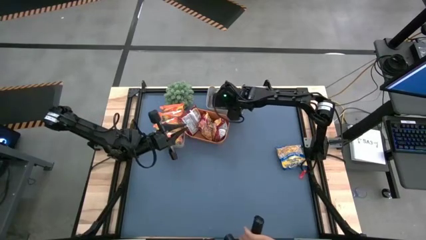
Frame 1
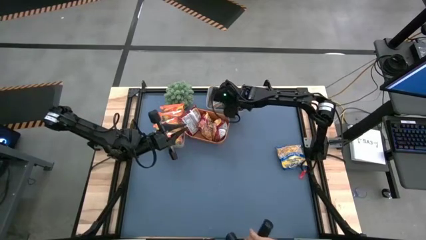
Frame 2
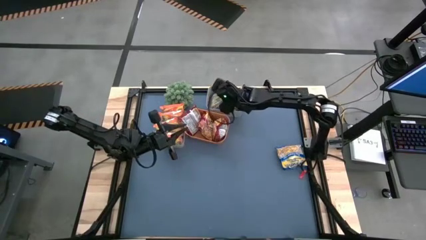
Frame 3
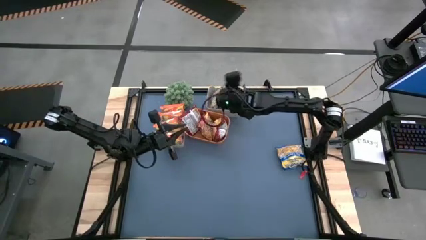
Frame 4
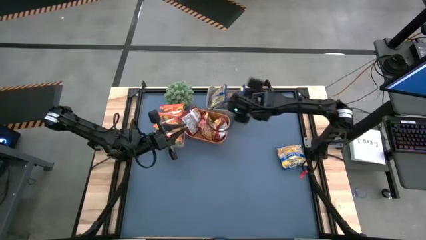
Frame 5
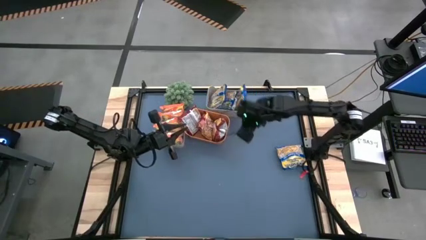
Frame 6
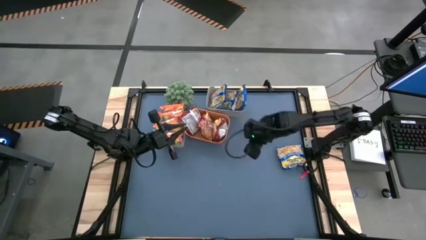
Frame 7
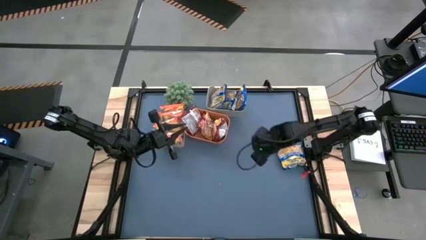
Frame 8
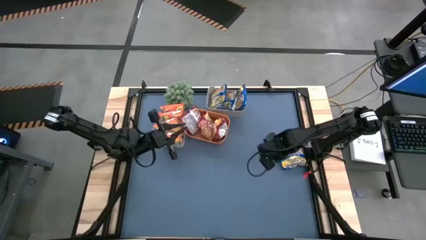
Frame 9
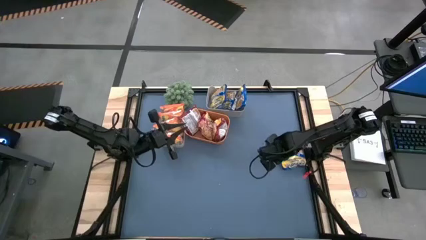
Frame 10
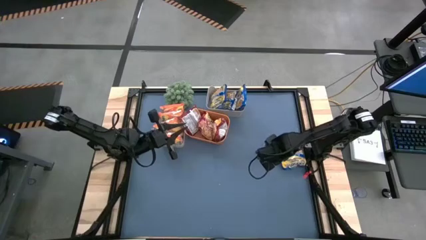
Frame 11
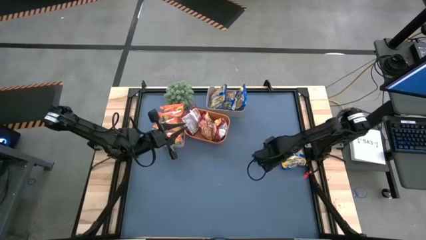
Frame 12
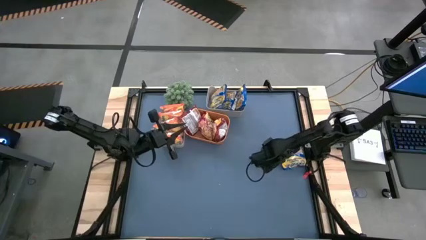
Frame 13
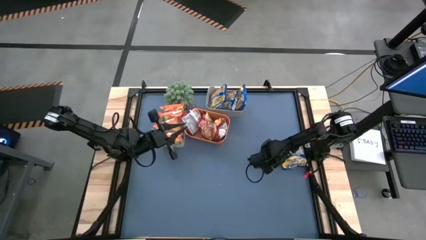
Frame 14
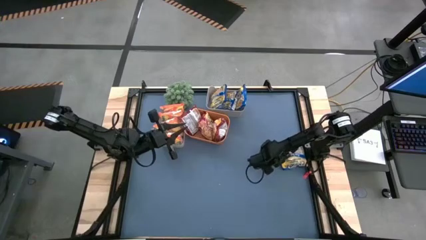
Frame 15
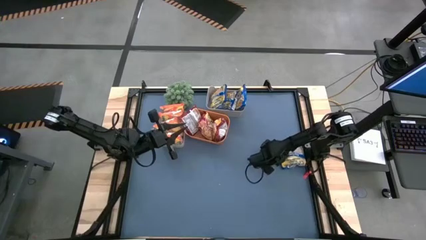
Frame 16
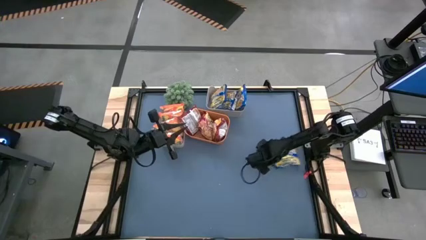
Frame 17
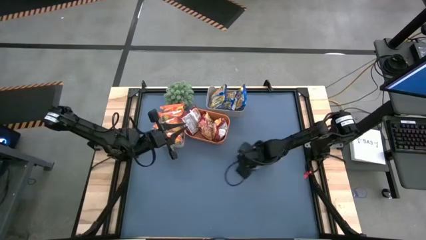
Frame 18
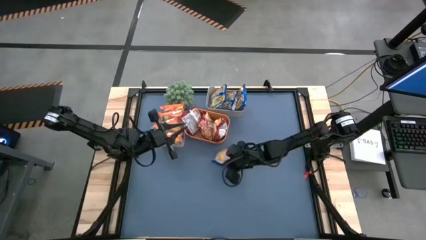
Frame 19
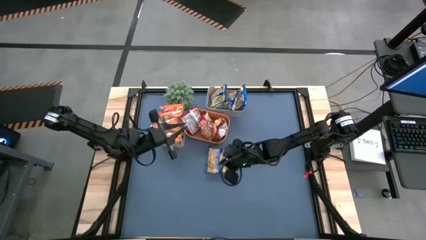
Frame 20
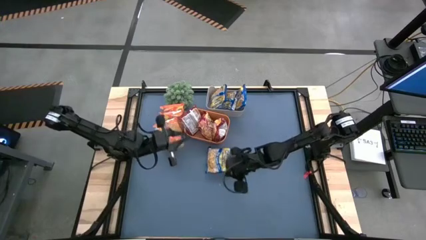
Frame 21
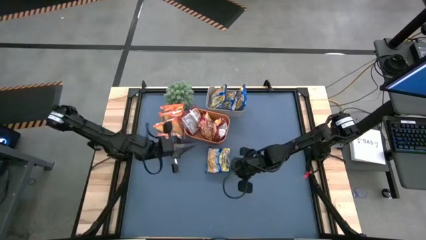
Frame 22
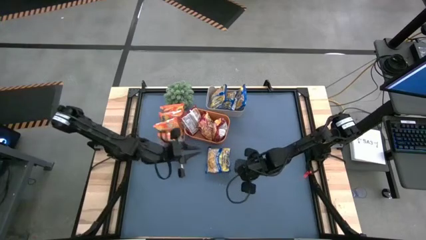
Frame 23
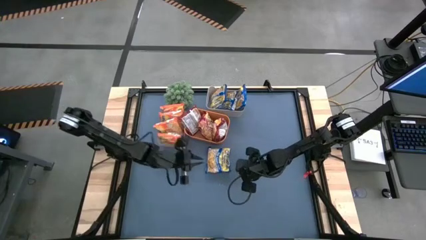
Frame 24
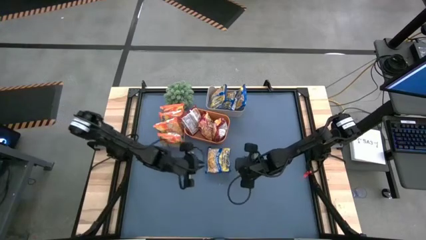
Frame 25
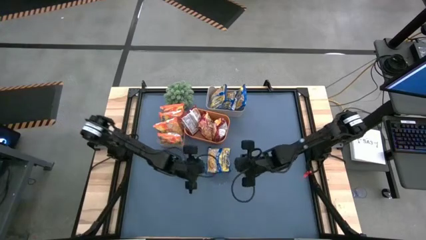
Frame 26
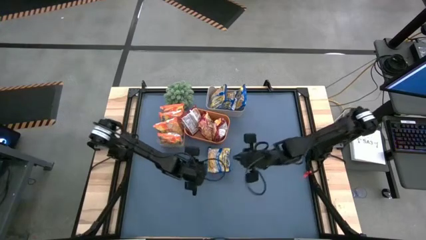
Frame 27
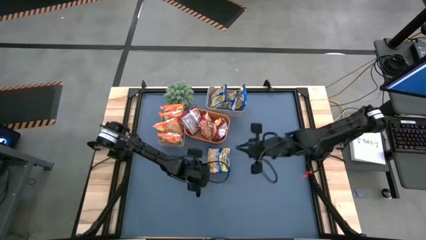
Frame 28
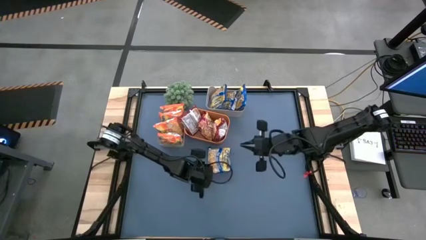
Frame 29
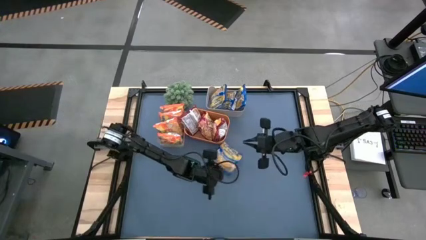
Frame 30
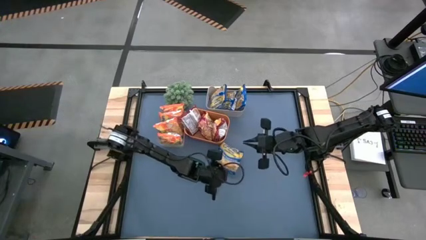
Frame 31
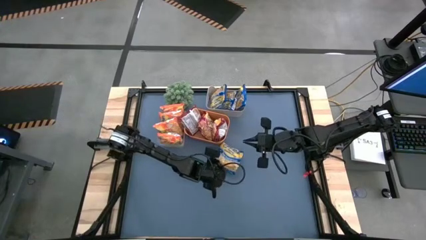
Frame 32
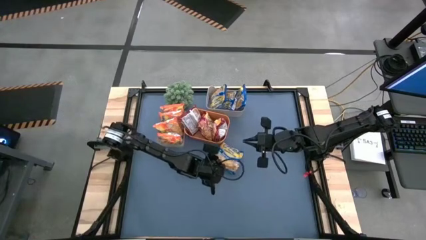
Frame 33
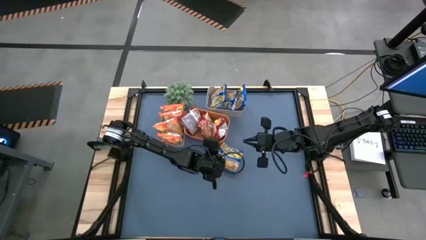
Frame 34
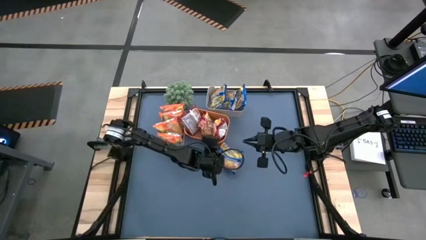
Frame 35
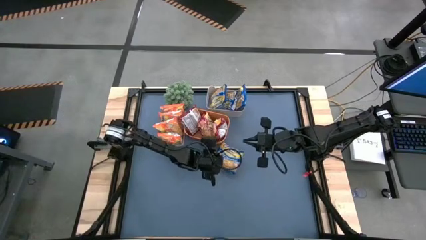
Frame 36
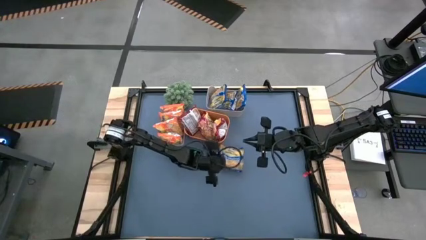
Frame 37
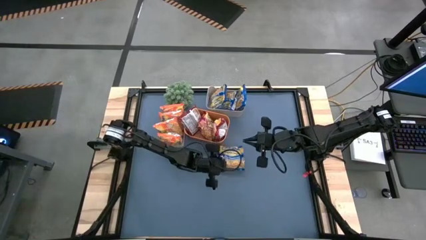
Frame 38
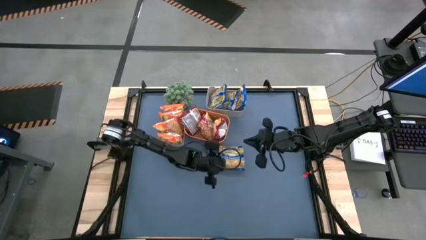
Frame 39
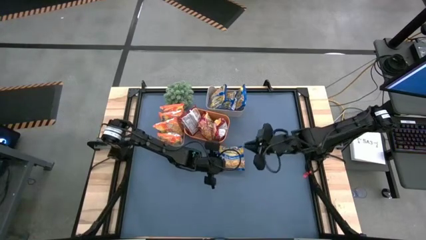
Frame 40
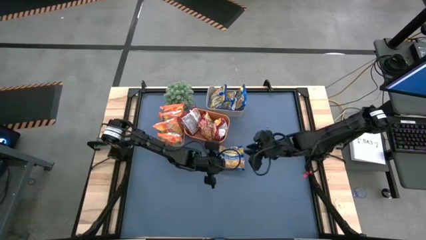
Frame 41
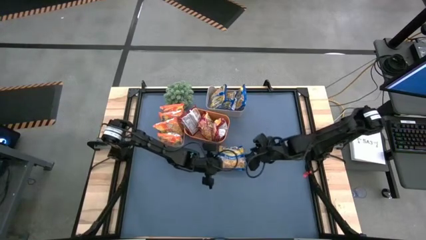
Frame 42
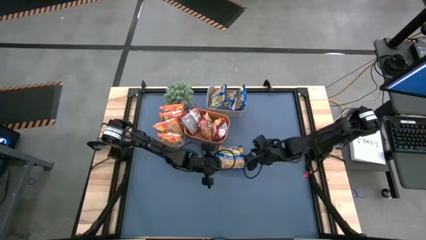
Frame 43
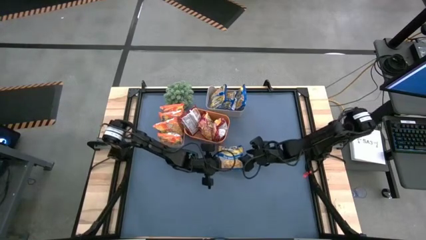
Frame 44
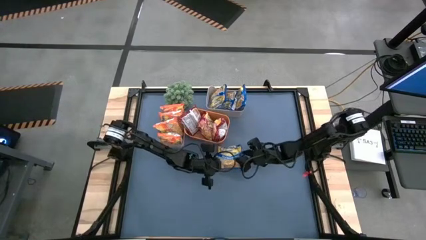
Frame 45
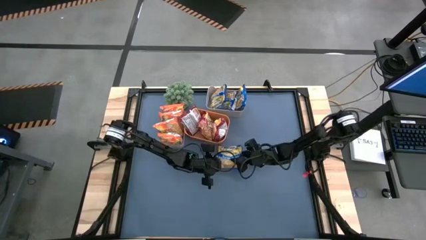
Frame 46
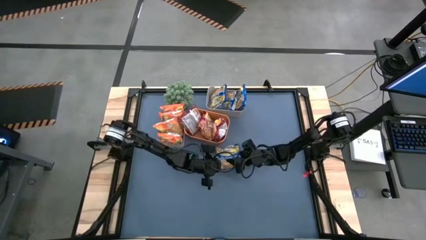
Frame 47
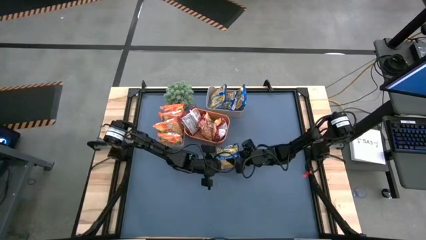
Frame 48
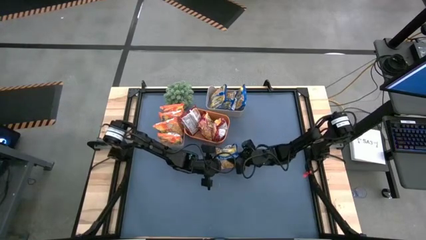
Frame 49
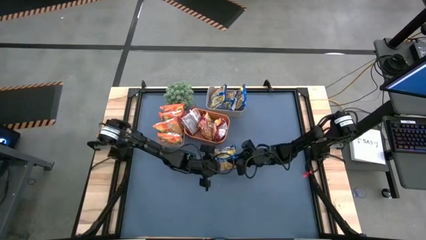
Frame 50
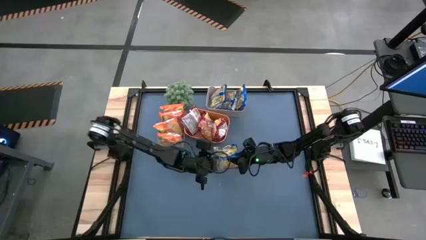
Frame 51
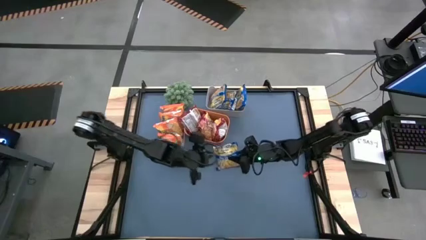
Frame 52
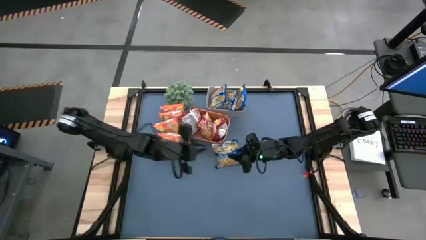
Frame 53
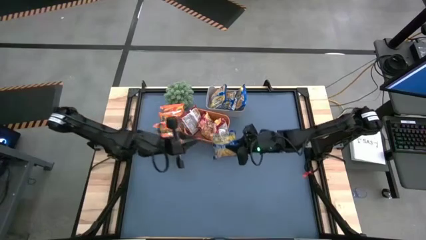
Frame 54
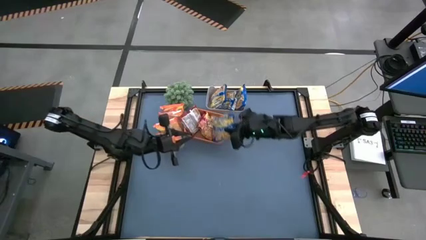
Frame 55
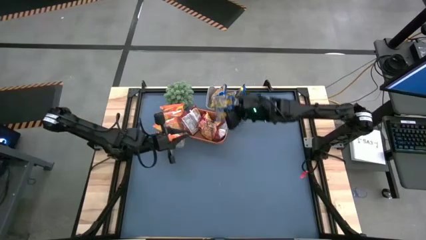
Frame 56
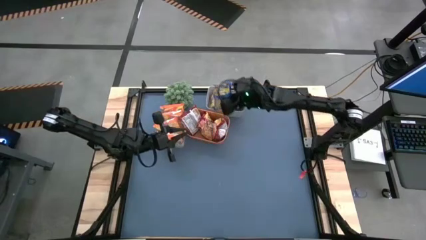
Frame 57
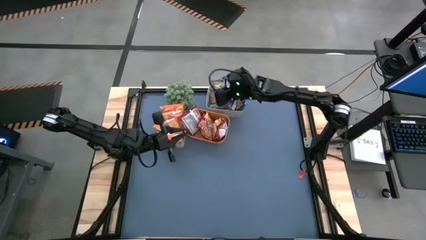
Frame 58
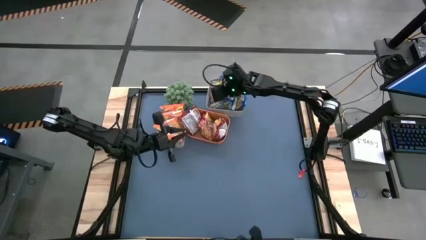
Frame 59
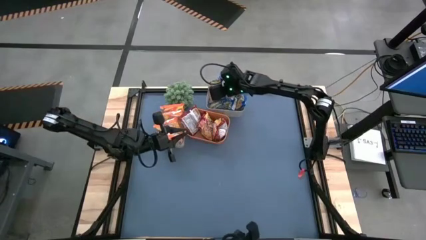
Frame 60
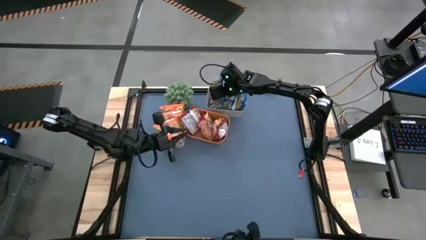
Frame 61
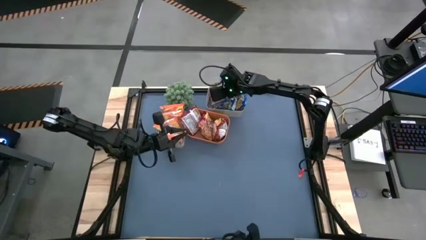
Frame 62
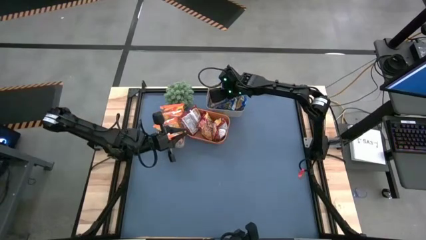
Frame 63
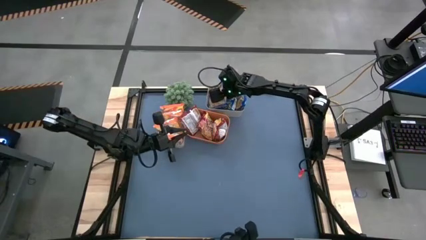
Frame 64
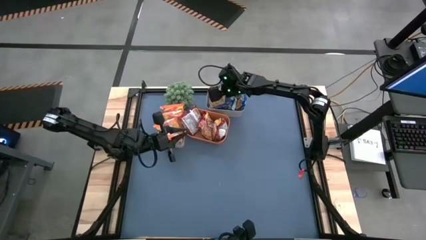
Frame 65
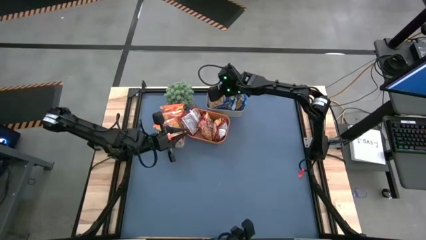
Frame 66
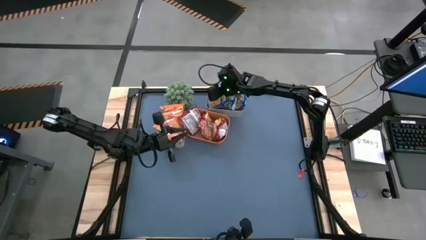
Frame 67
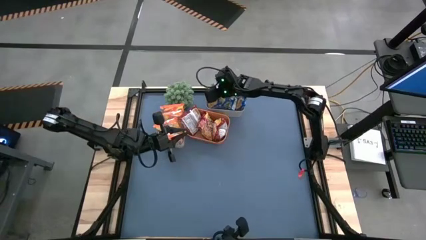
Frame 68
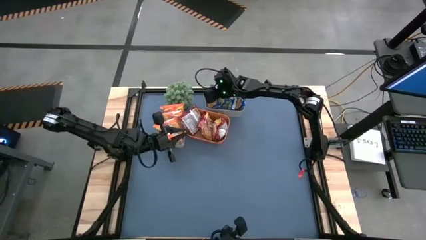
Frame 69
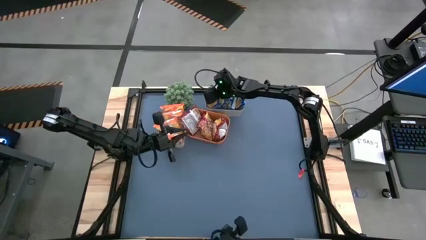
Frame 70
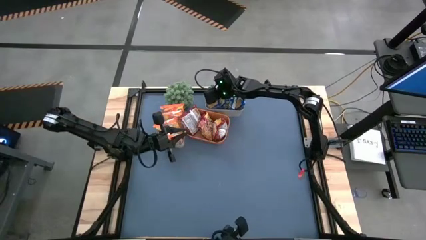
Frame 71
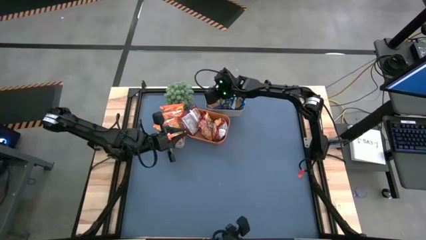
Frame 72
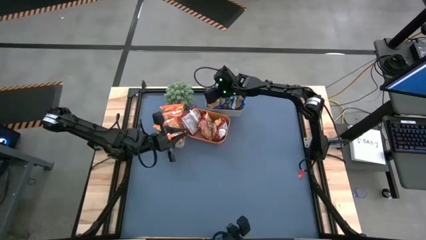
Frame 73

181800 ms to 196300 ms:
Task: Sort Maruchan noodles
Put the blue noodle pack into the gray bin

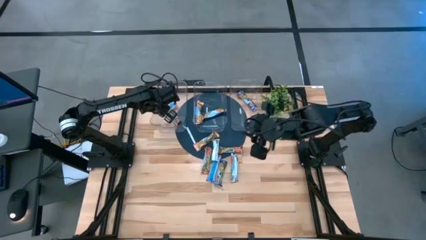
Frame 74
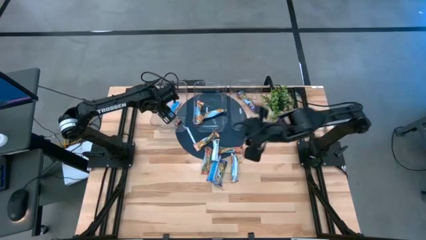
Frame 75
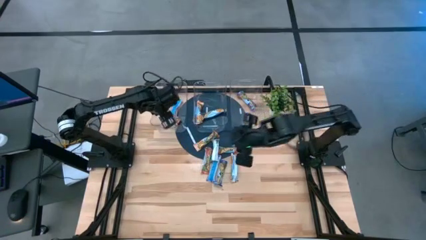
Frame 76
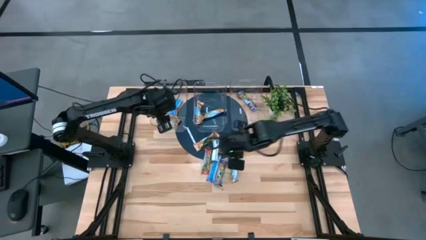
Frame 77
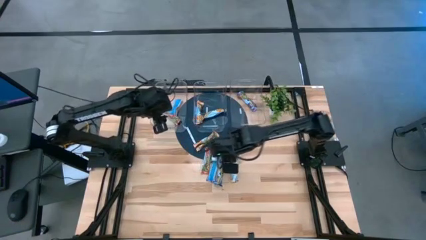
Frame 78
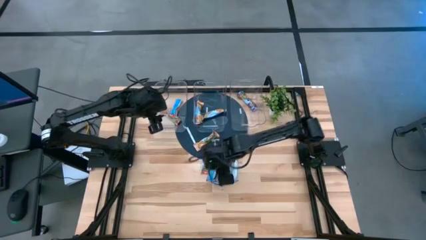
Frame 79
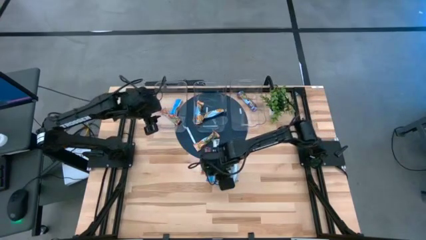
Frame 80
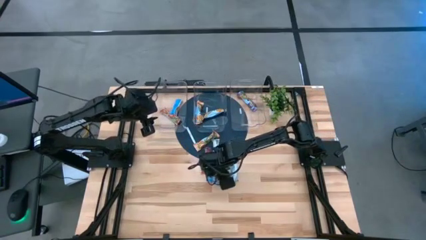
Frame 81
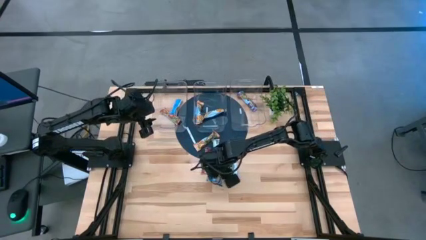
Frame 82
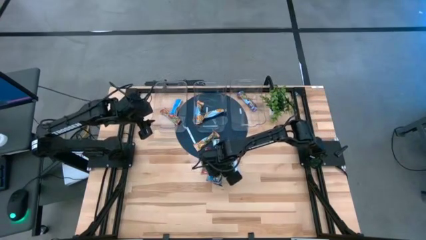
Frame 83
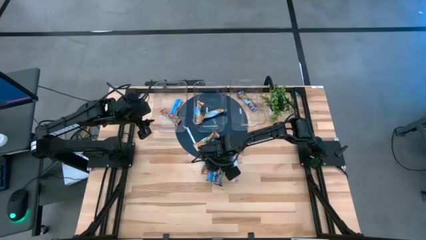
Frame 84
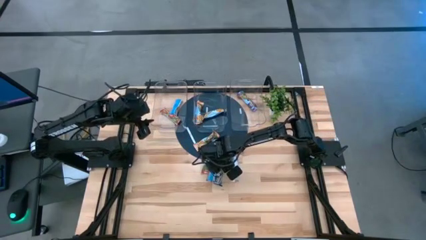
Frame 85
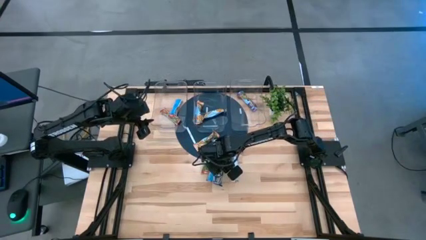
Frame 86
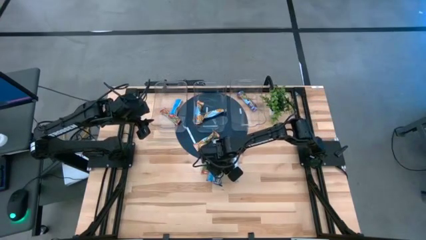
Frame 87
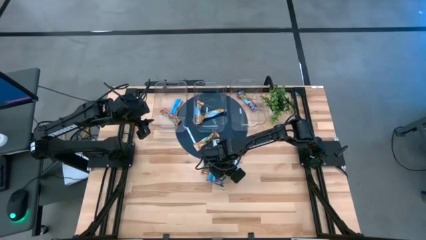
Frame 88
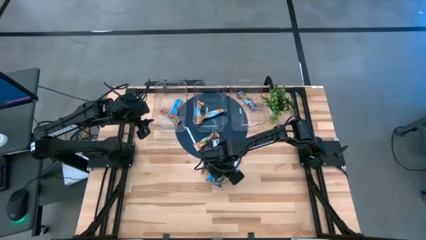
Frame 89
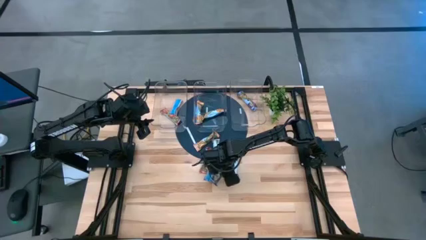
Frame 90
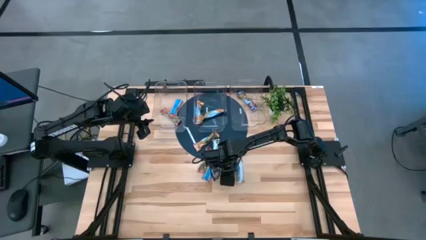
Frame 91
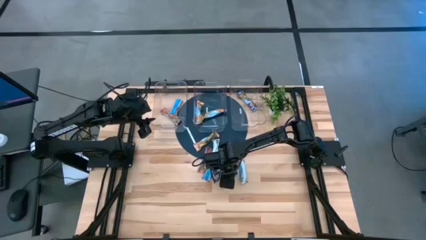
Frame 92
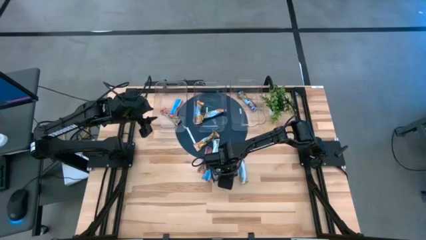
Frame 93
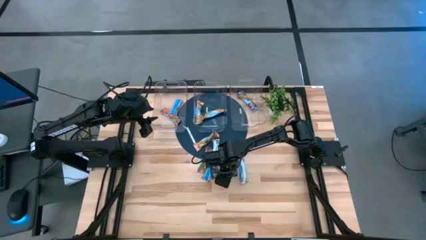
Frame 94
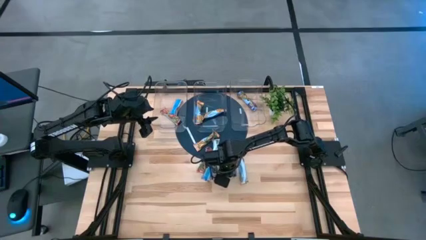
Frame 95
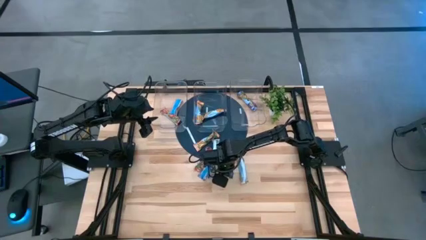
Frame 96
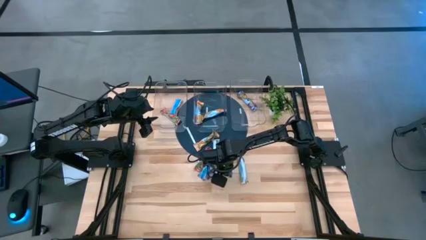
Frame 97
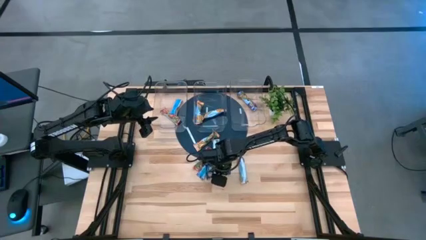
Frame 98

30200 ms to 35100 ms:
Task: Pick and place Granola Bars by type
Put the blue granola bar into the right transparent bin
